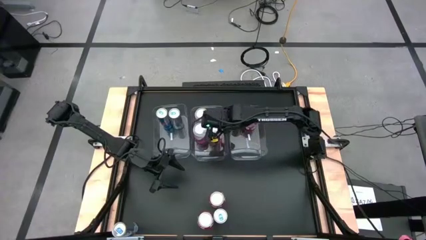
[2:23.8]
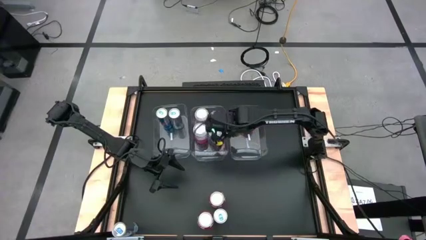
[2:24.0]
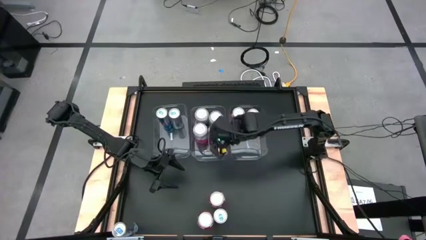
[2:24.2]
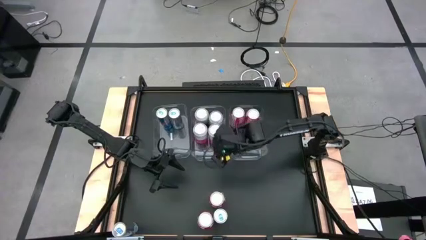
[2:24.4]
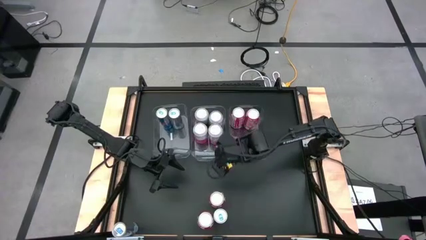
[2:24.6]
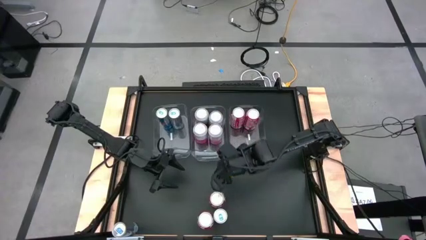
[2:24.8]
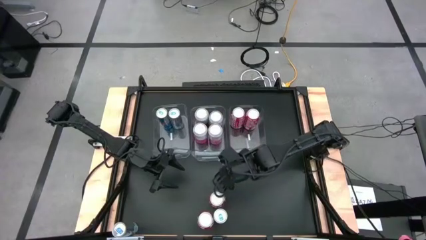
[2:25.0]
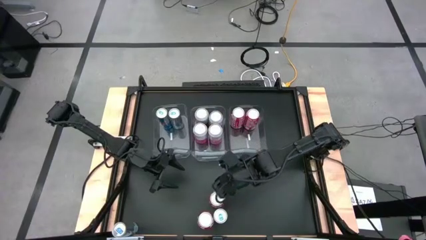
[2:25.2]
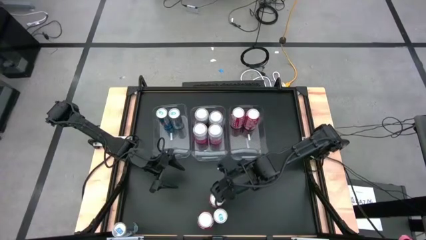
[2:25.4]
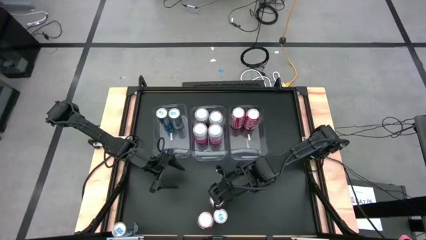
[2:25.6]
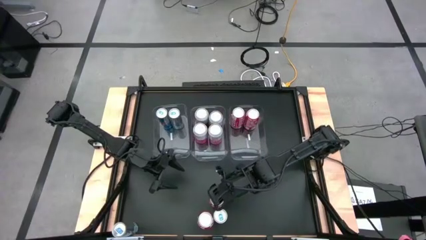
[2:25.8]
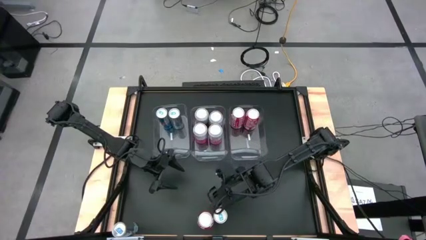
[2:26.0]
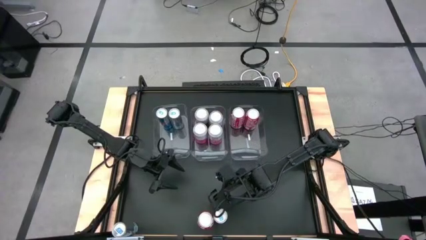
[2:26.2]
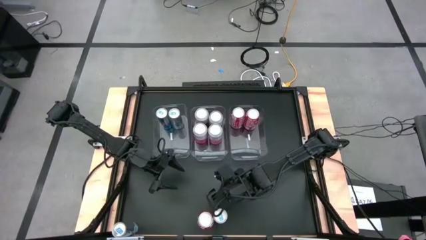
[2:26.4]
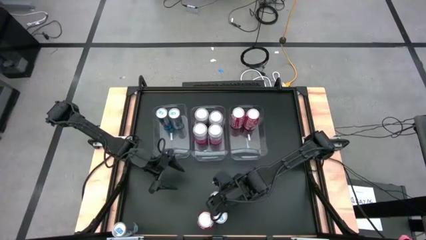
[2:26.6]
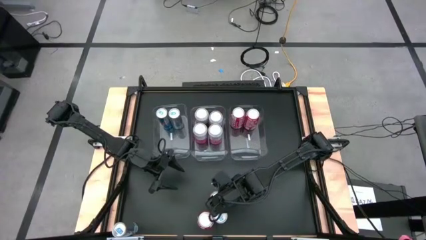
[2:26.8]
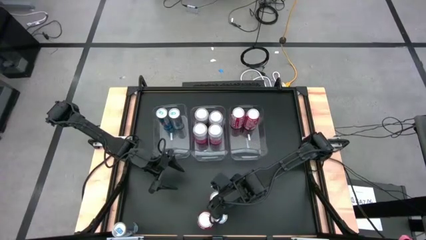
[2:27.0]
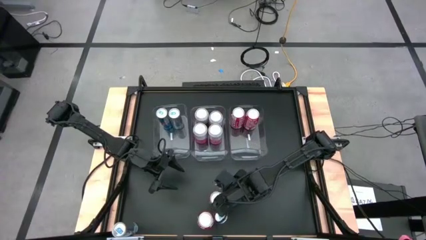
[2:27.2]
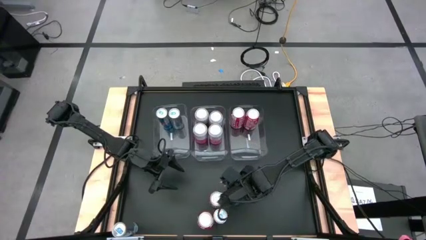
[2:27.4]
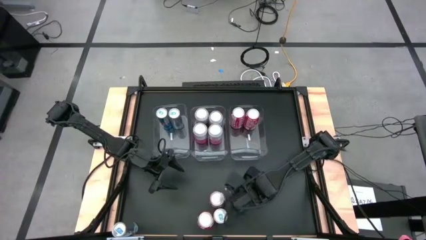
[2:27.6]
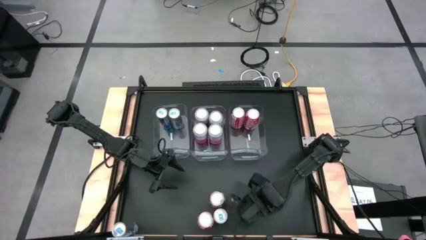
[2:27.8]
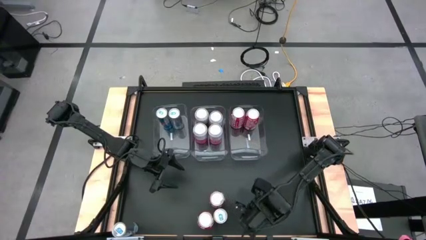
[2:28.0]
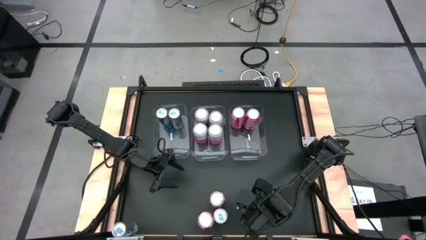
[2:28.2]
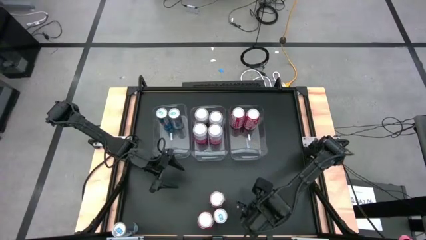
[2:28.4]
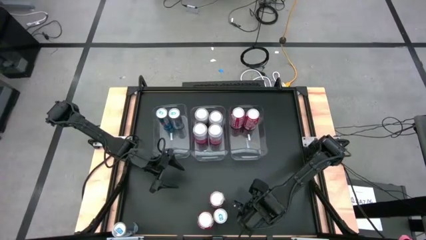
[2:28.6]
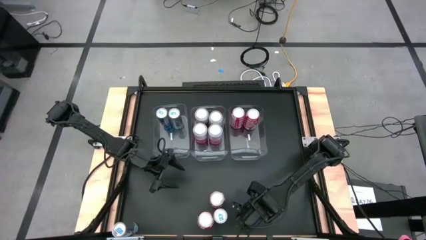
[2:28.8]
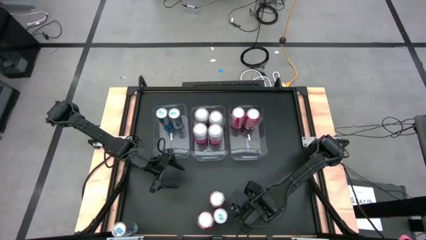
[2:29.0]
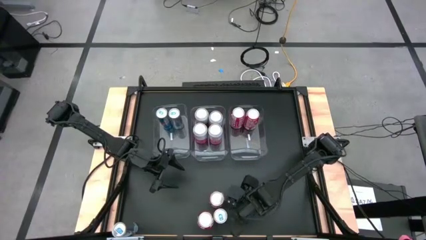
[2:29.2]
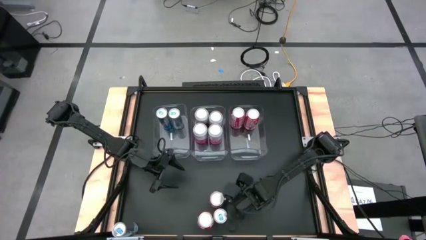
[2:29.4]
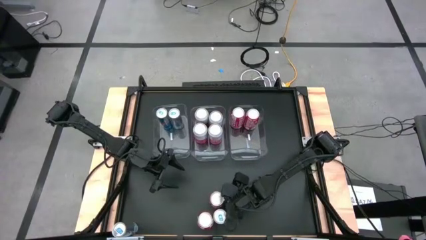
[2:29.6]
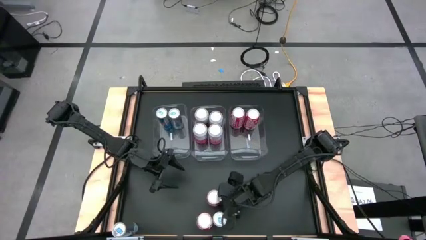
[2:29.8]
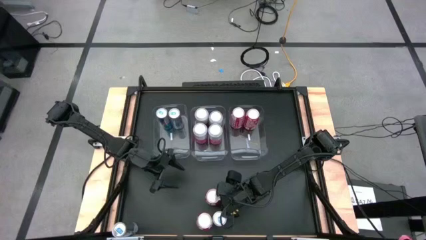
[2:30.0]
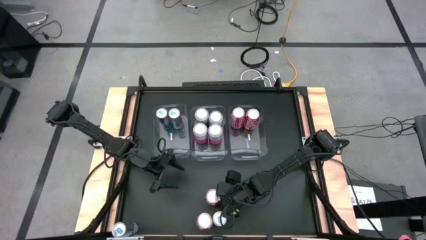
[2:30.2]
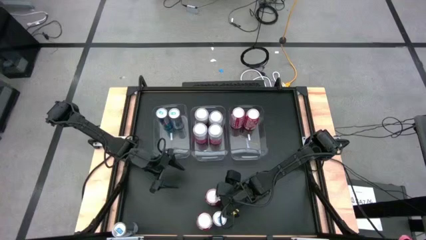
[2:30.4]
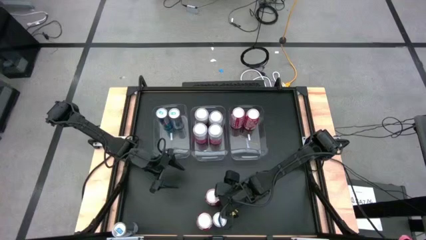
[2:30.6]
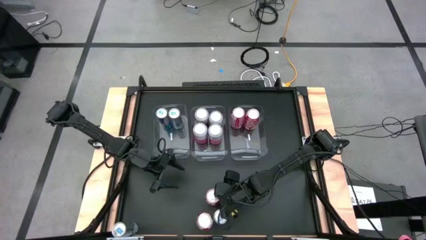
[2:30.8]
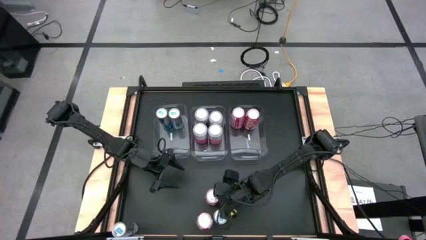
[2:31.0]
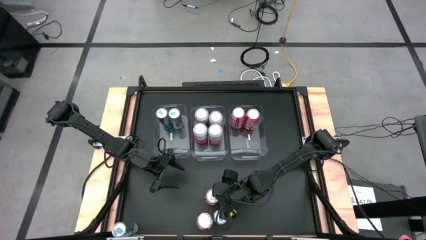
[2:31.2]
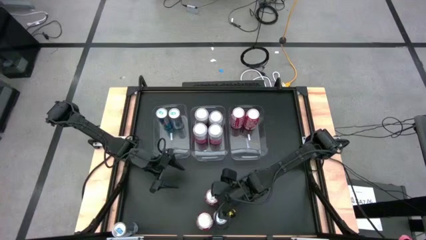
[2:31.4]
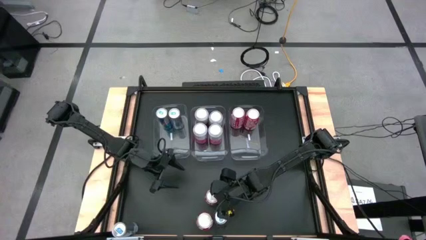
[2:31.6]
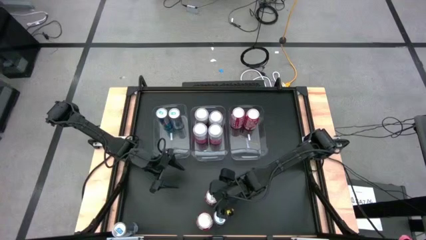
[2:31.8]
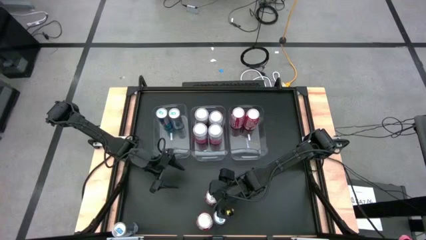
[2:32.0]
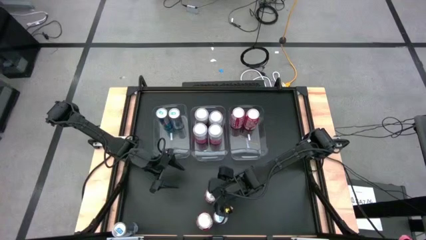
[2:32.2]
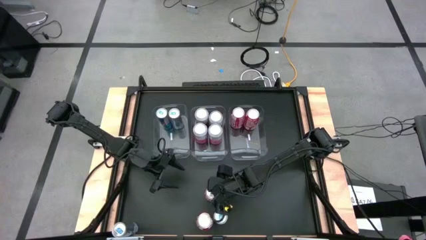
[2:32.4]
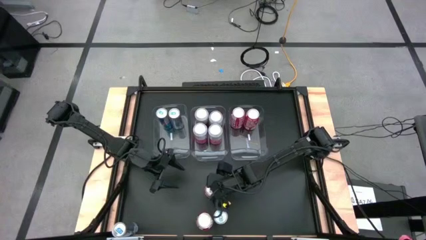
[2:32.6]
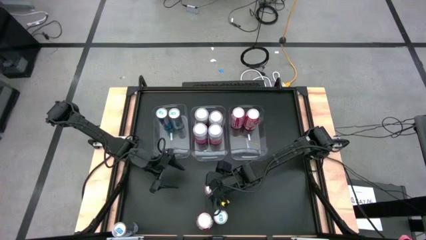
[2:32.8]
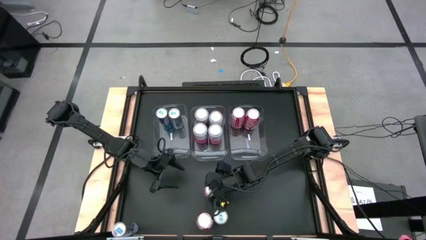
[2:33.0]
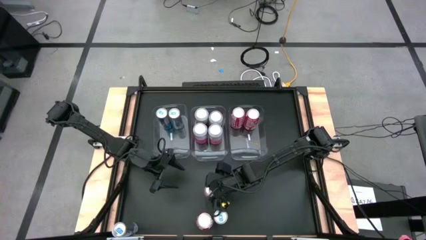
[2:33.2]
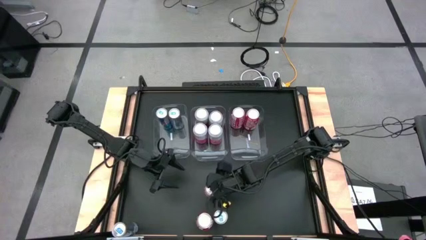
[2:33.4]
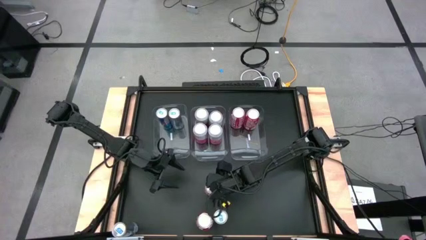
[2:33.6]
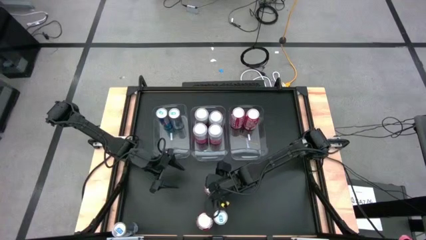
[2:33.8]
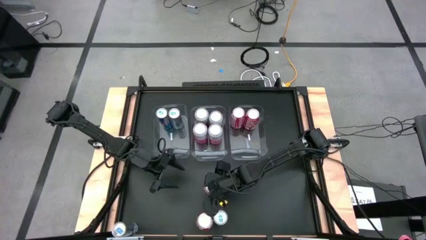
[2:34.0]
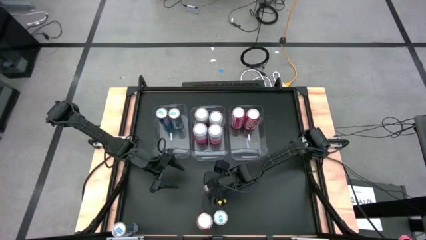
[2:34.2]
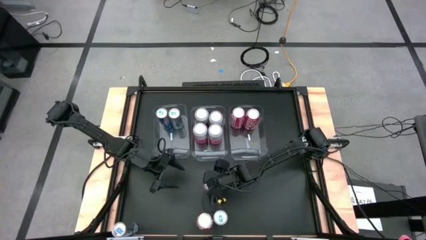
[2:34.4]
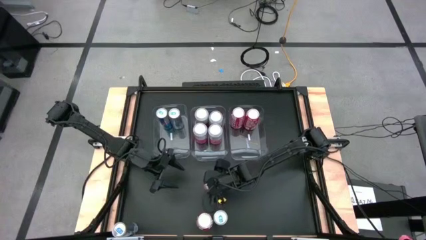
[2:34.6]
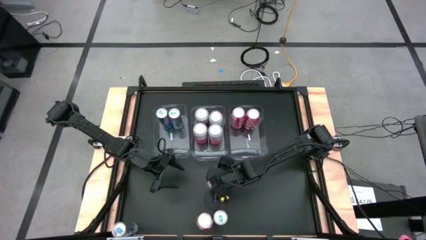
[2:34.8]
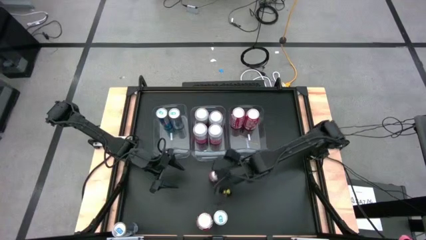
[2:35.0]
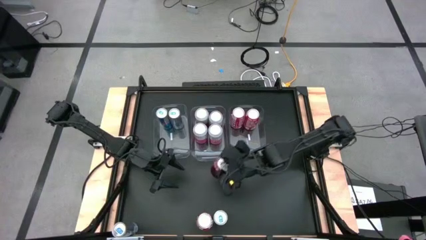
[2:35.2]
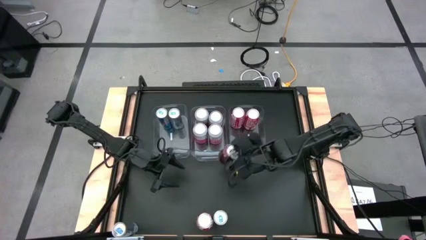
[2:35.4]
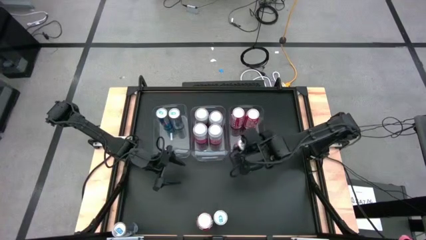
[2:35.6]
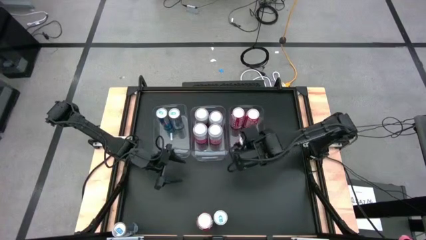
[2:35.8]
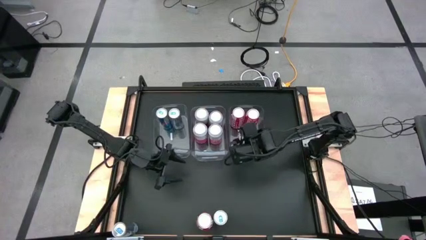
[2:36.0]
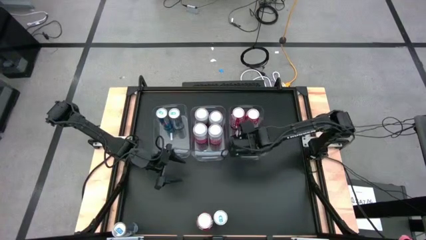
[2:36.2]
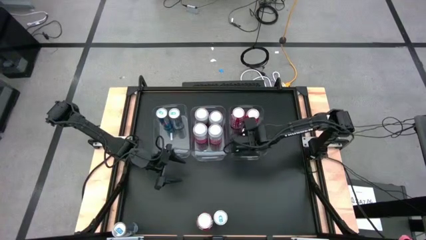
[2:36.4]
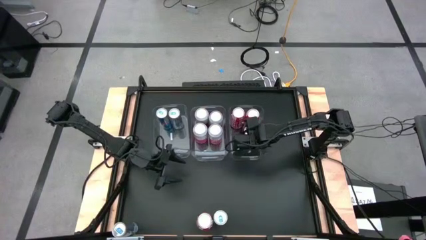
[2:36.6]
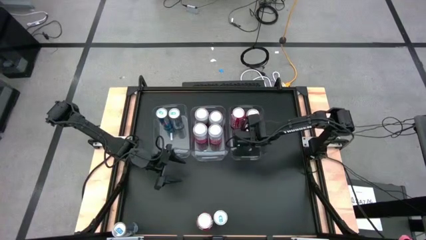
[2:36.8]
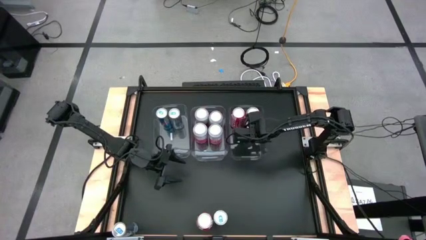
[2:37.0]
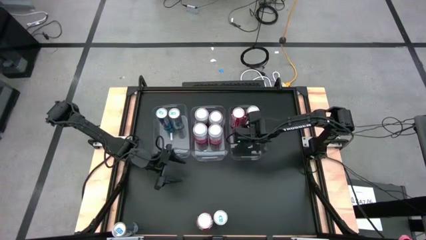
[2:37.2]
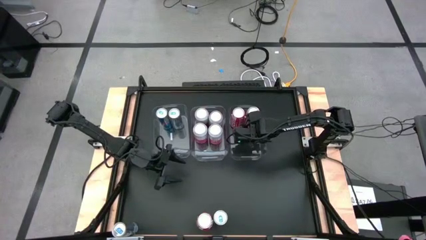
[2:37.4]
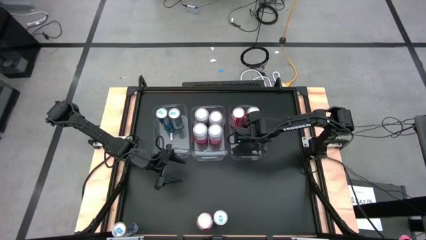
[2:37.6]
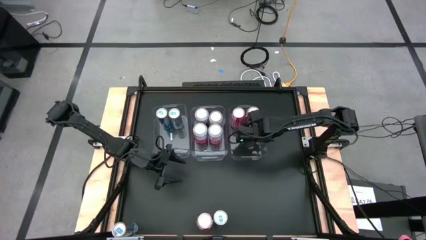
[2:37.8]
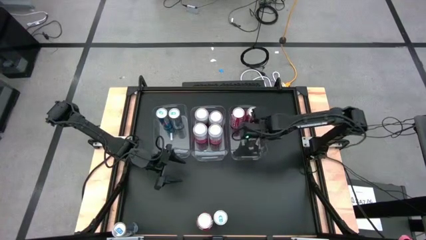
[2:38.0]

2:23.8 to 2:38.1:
Task: Sort soda cans
Put the red-white soda can into the right transparent bin

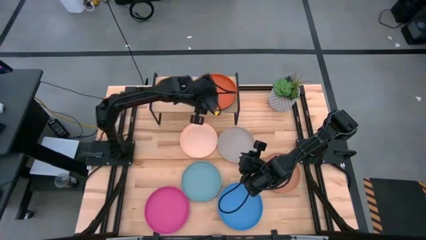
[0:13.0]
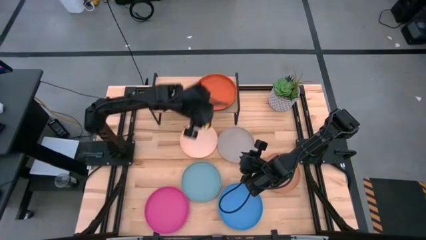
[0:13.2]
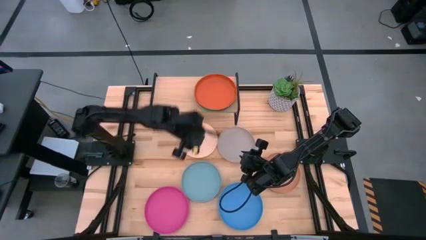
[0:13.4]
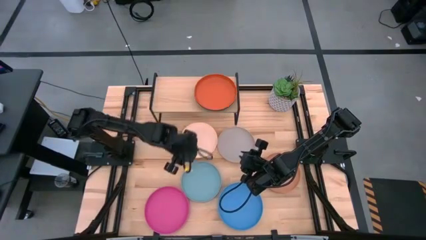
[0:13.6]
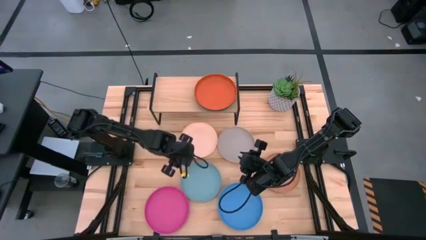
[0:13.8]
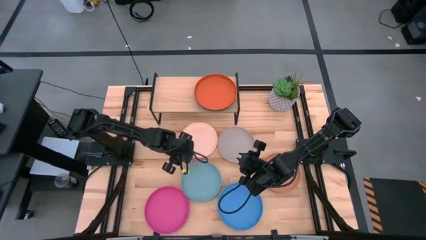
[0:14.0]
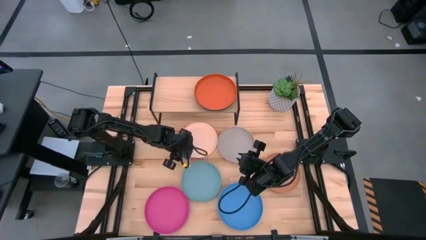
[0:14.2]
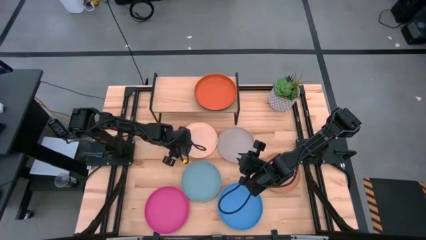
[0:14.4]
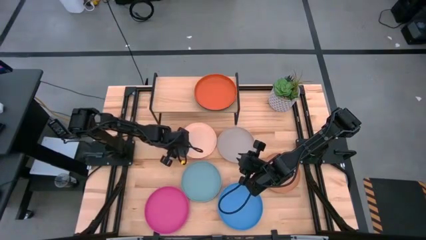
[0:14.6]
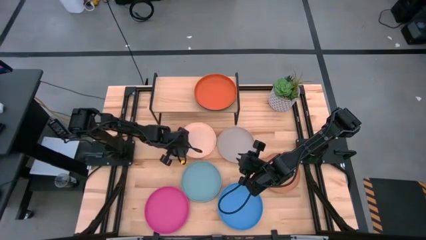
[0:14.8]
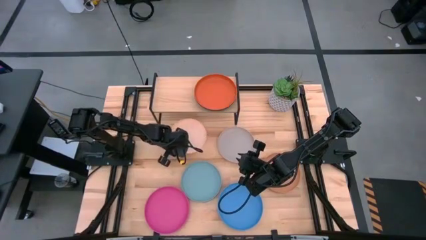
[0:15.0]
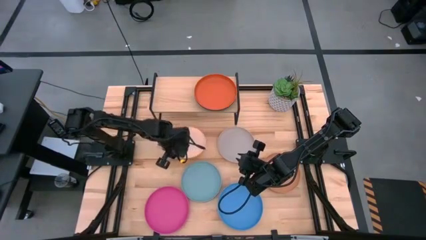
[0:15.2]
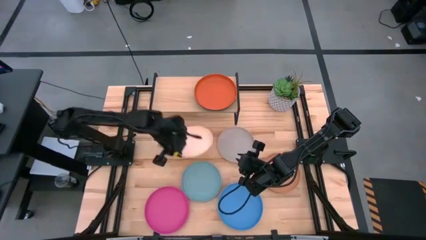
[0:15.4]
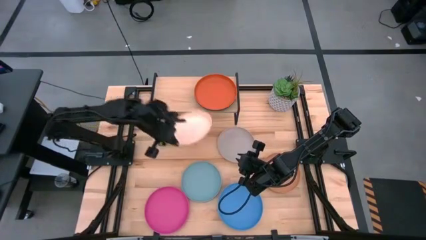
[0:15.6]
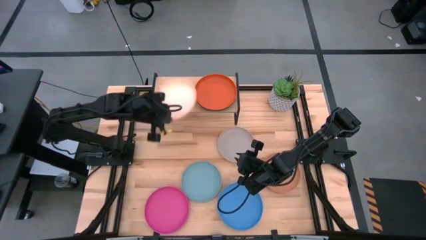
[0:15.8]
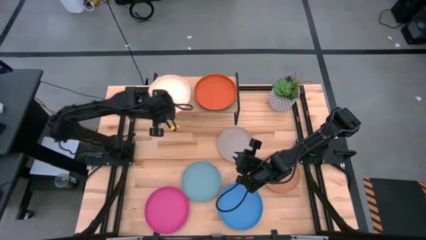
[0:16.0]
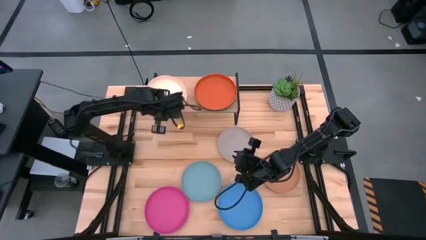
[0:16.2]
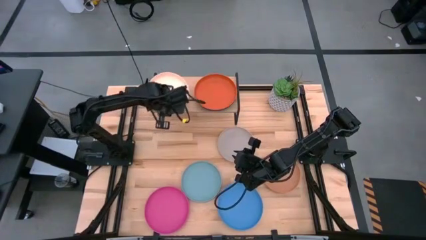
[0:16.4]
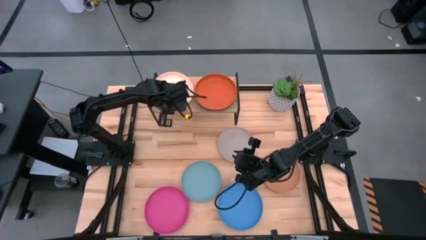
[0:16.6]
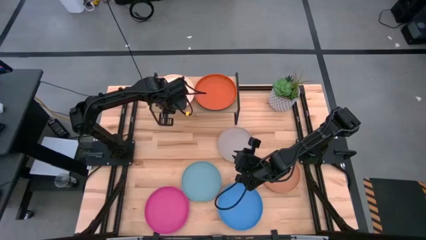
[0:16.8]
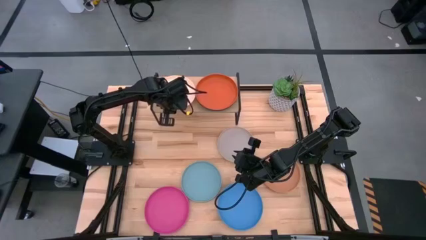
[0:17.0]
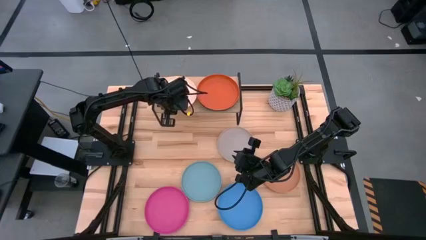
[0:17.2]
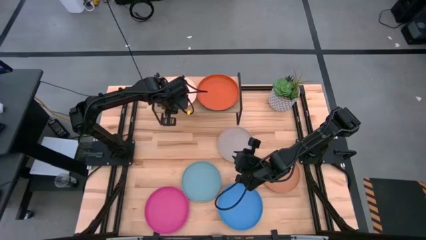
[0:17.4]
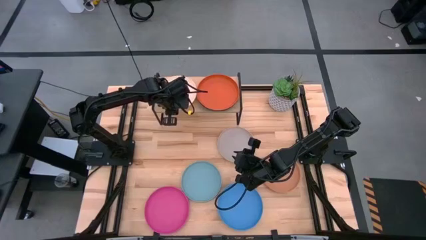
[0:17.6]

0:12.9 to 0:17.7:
Task: Place and stack plates onto a shelf
Put the light red plate on the shelf
